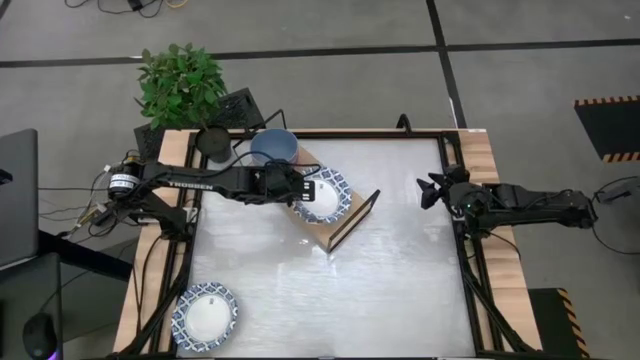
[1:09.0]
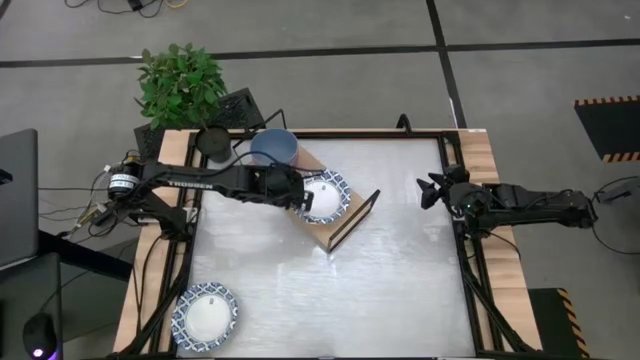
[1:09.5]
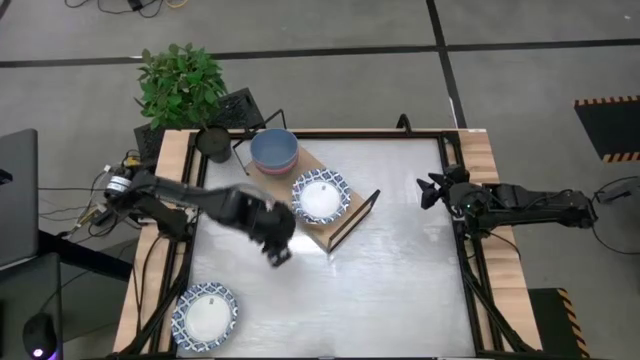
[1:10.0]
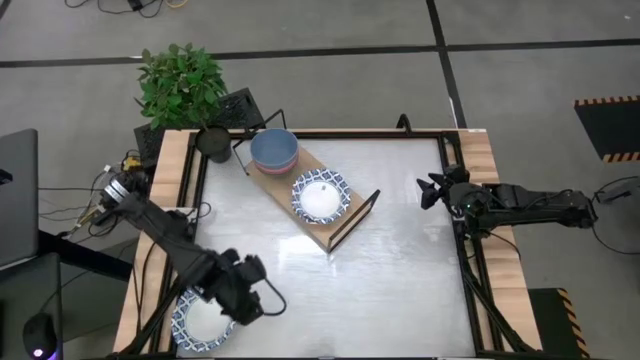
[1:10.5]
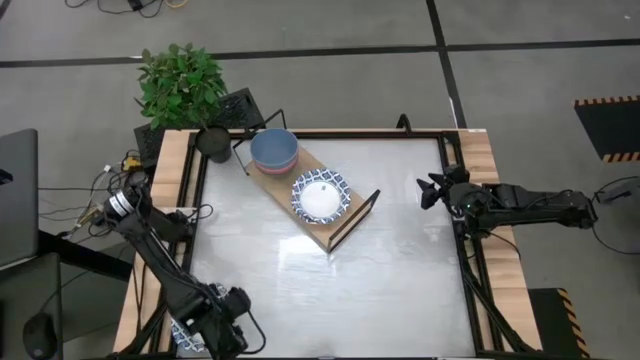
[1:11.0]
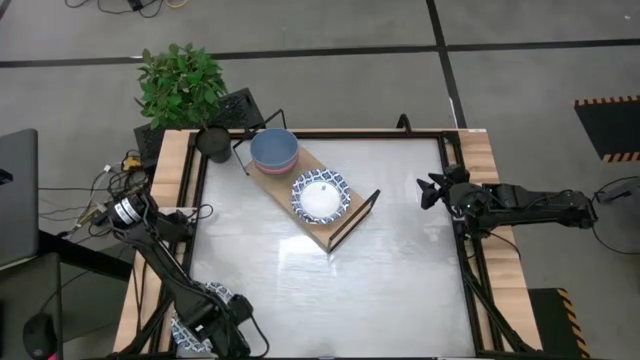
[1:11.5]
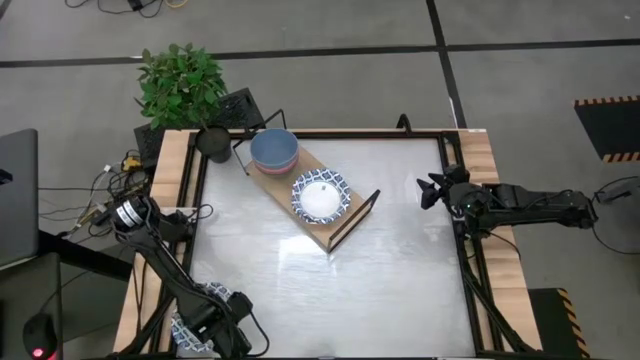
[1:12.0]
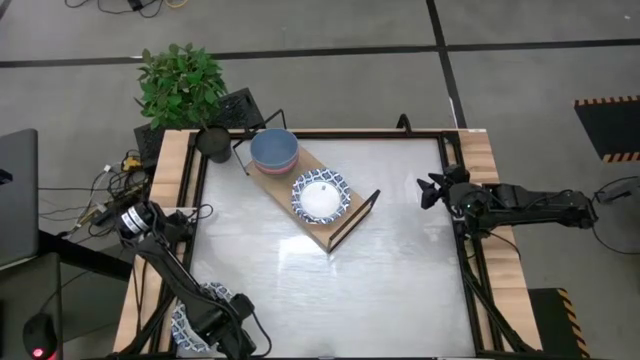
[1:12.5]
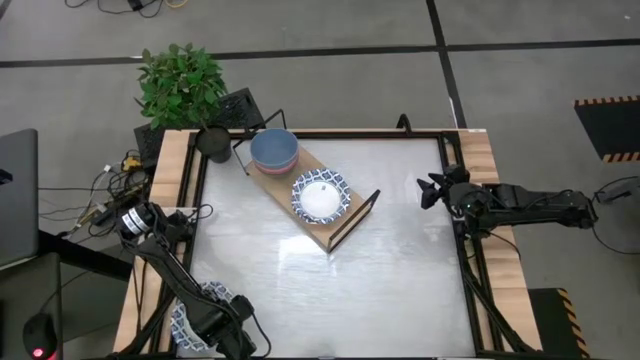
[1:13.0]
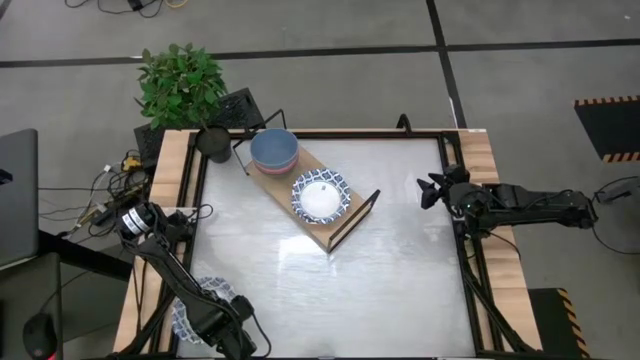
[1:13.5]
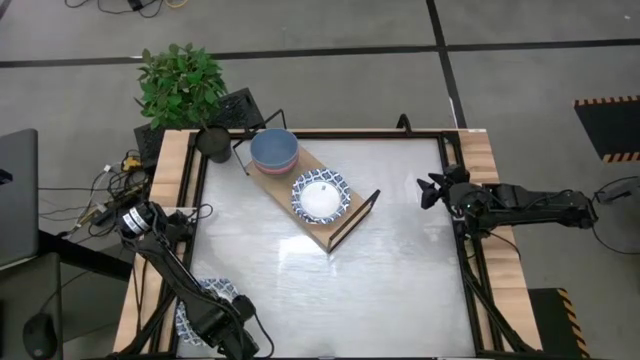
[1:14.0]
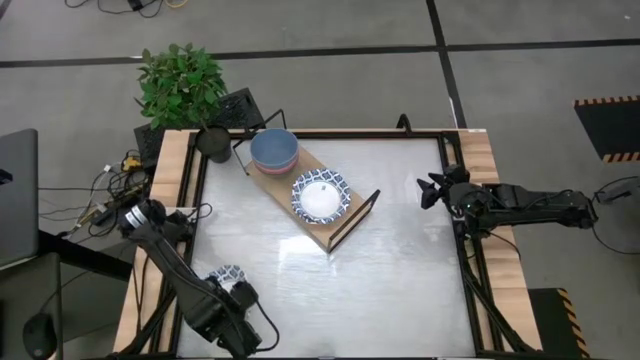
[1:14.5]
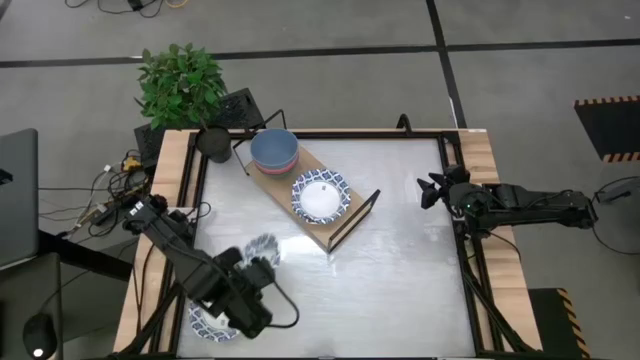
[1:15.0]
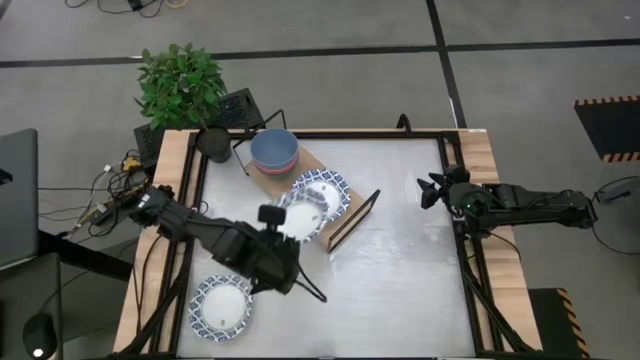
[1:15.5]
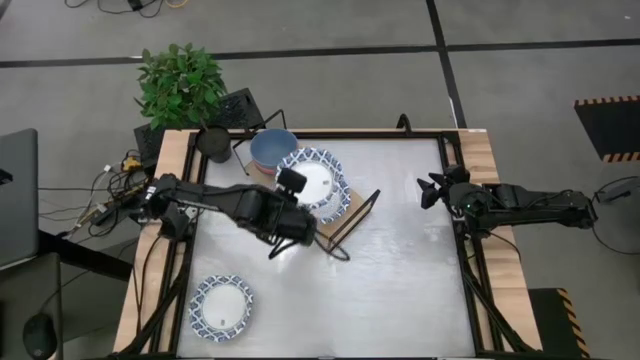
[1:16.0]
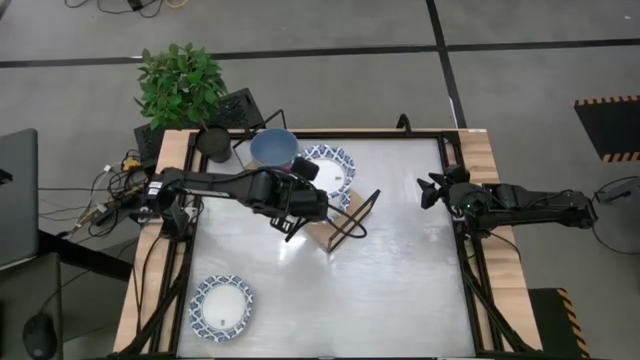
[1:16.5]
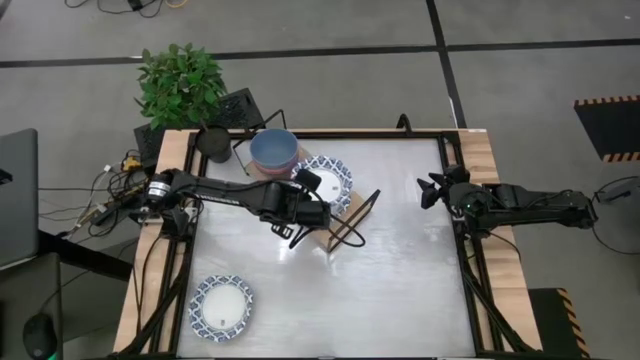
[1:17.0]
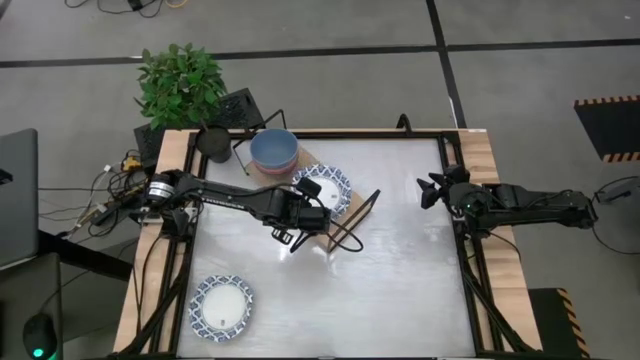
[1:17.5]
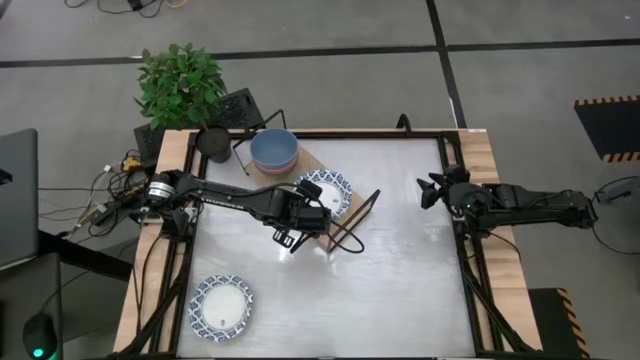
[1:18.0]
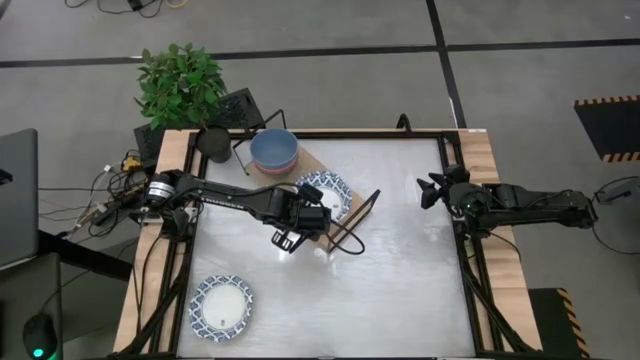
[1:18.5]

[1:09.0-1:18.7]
Task: Place and stack bowls onto a shelf
Stack the top left patterned blue bowl on the patterned blue bowl on the shelf

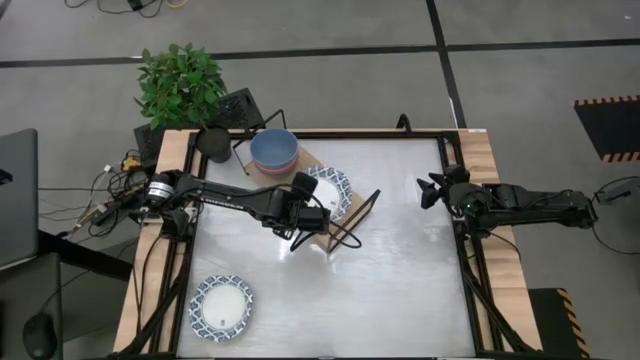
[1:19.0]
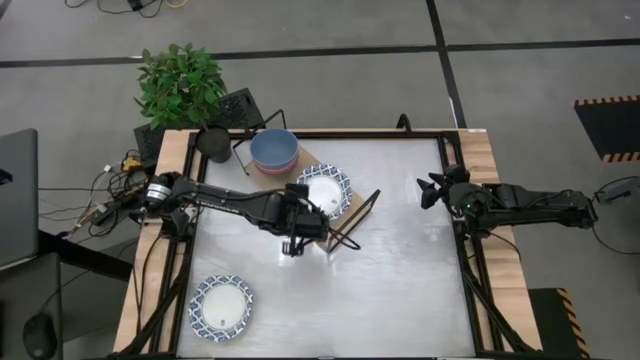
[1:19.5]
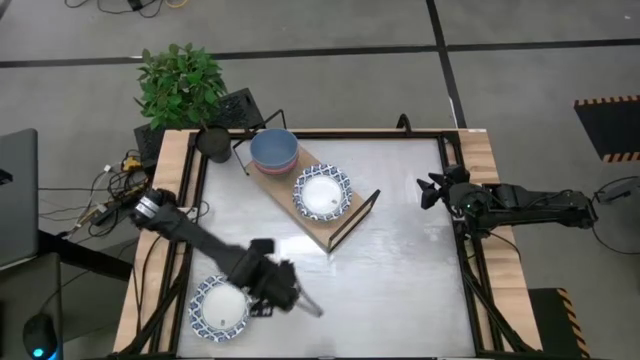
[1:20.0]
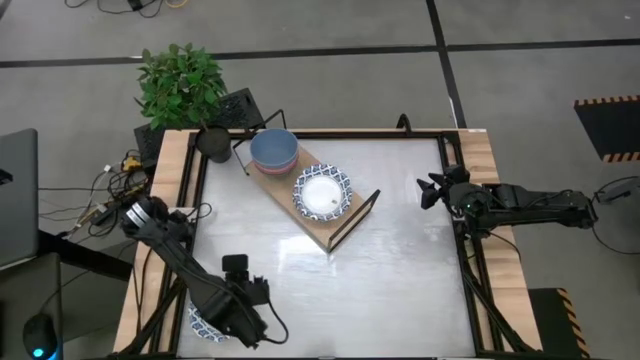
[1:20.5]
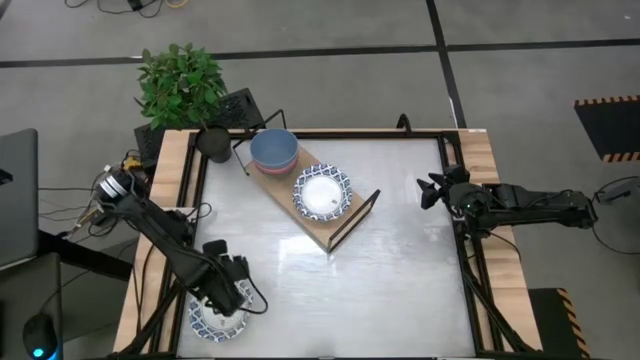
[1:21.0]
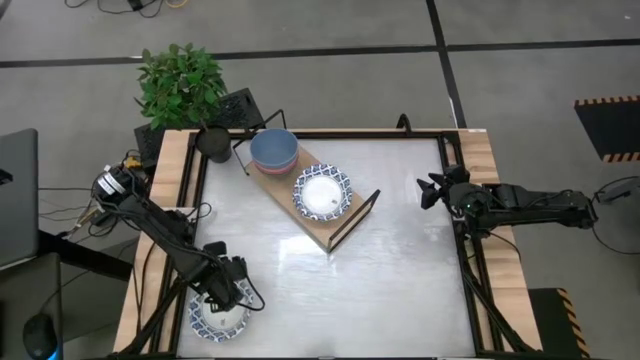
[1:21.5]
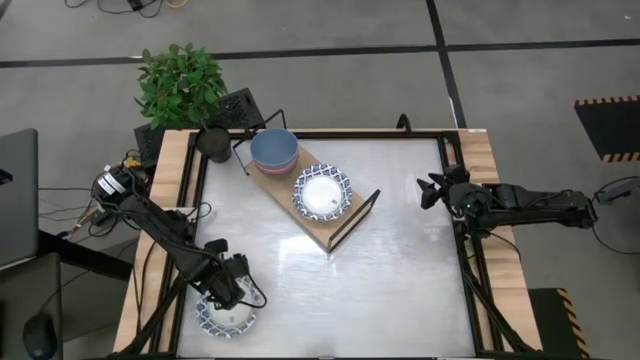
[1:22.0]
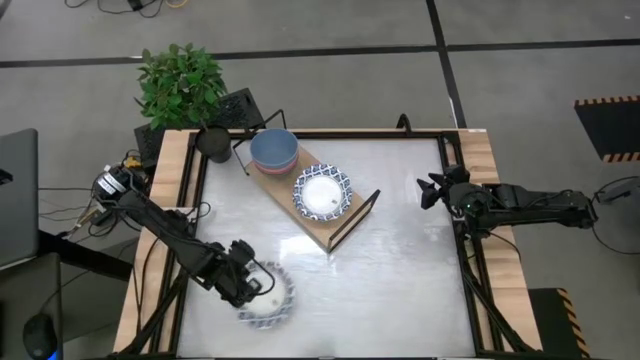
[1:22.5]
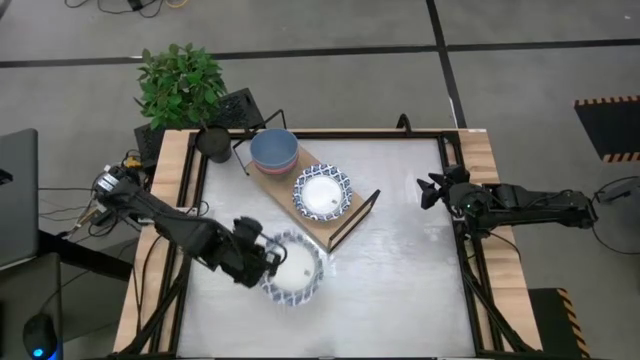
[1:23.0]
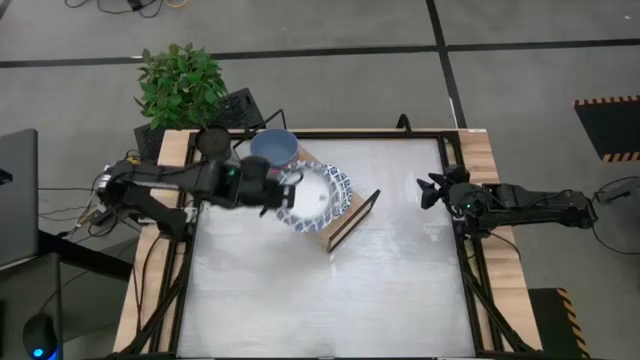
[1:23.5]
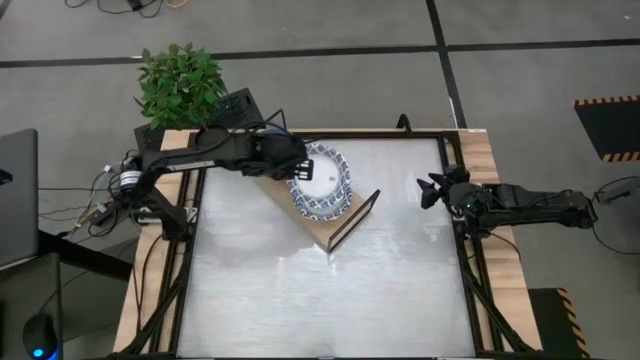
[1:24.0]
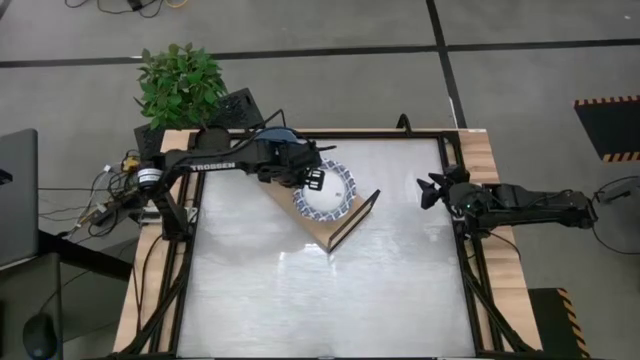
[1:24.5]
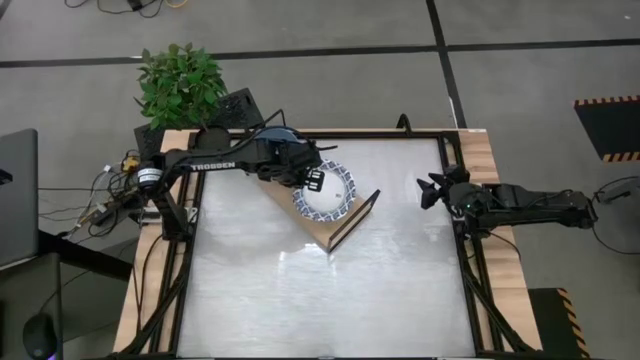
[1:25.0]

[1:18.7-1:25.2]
Stack the bottom left patterned blue bowl on the patterned blue bowl on the shelf

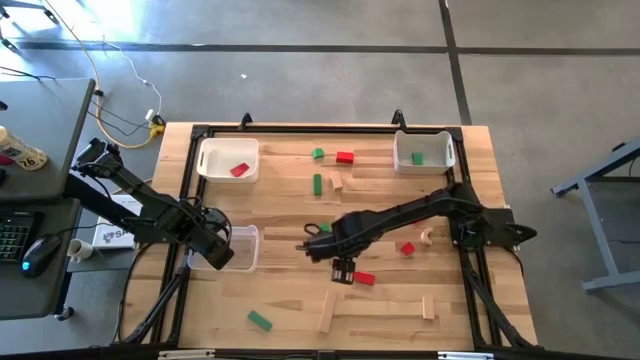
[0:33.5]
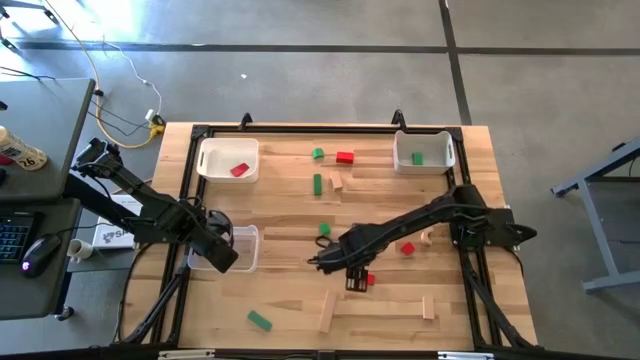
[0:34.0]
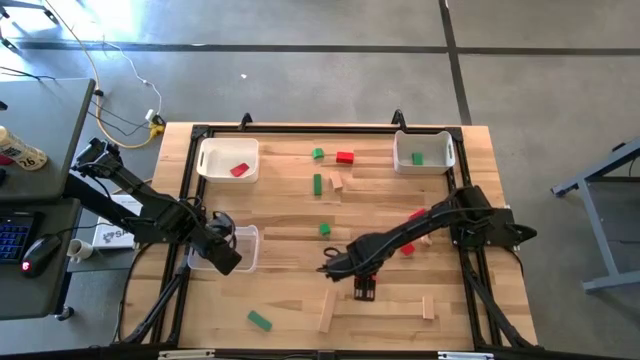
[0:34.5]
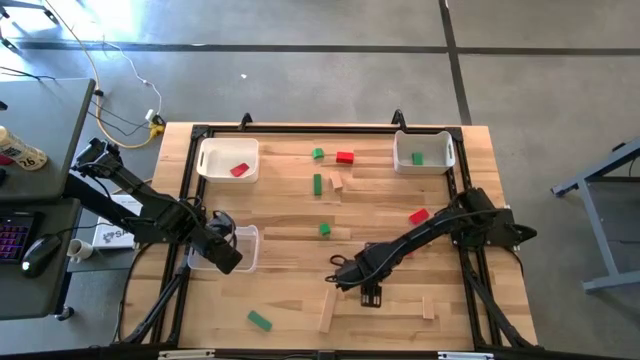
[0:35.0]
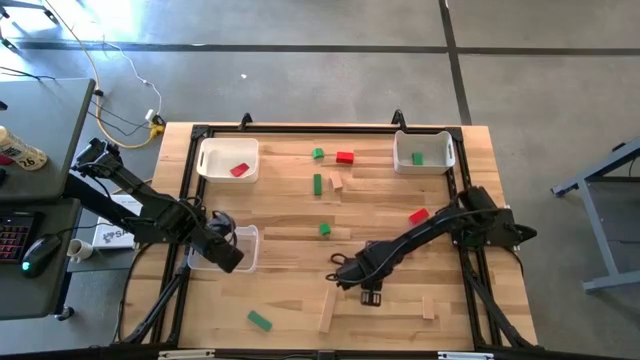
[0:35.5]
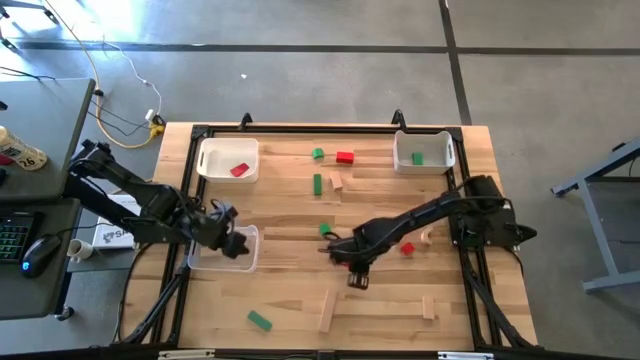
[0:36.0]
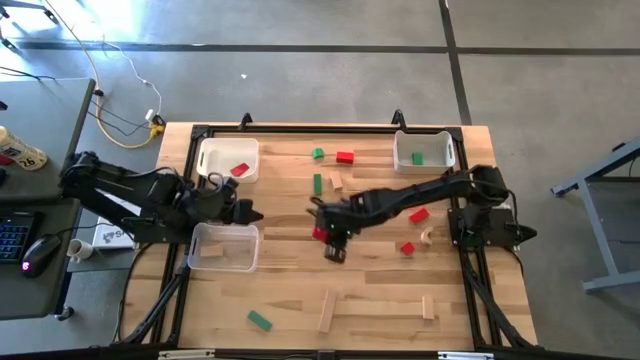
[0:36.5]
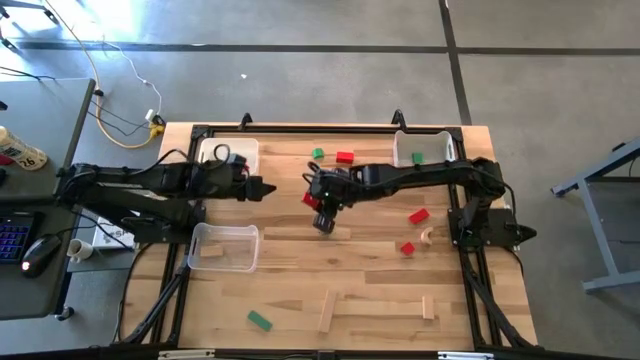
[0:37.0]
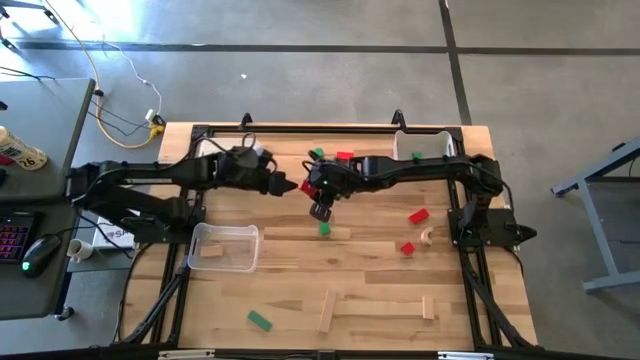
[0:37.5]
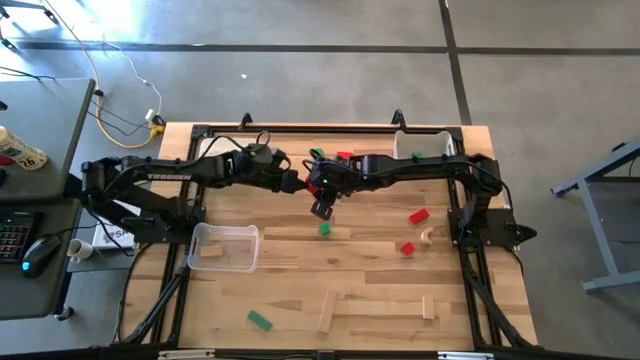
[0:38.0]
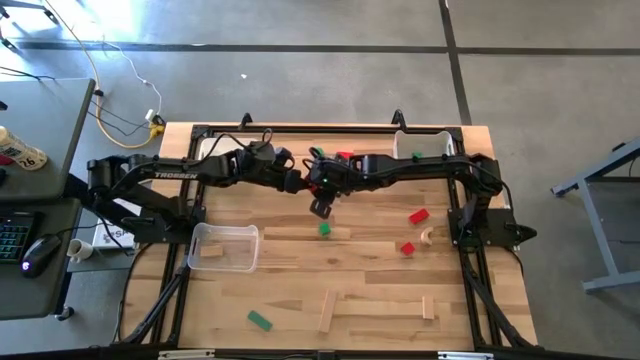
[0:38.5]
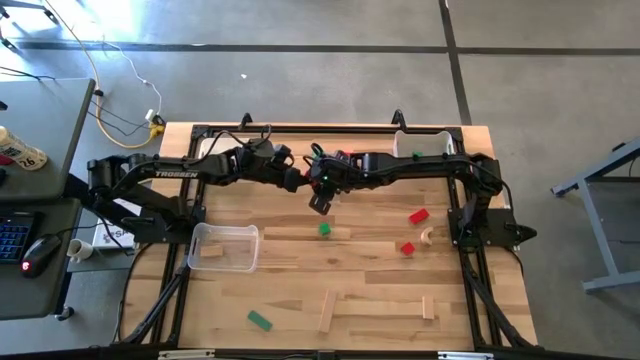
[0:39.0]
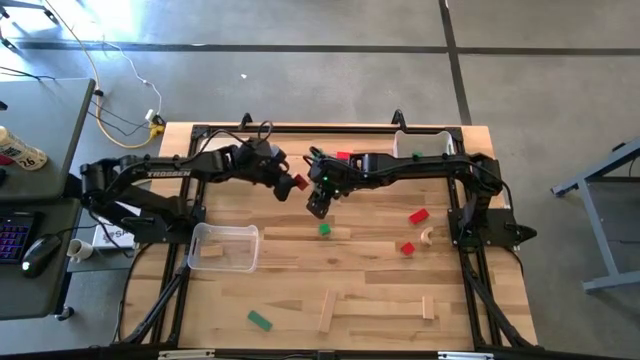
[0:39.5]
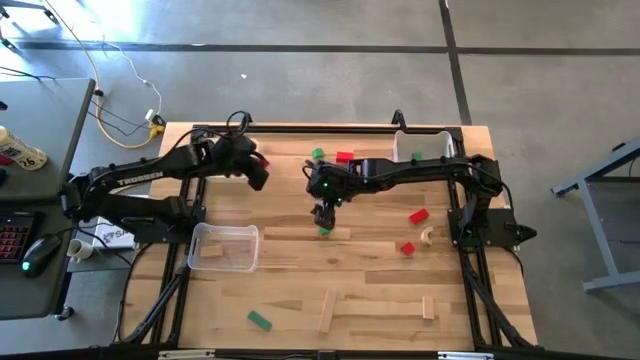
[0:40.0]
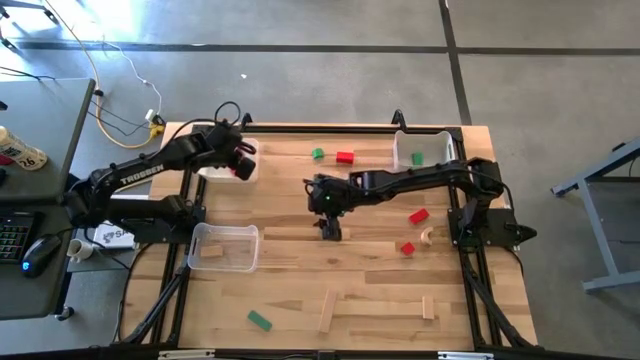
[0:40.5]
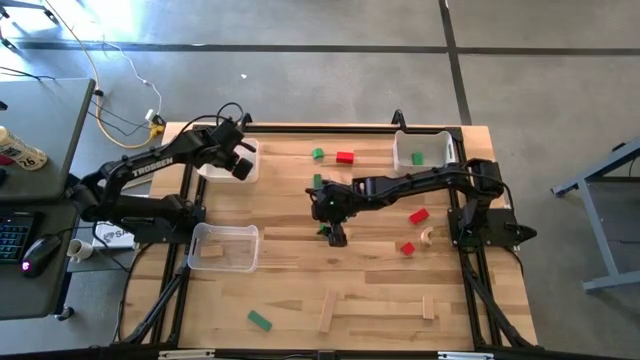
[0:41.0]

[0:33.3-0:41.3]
Task: Sort & place blocks by color
Put the red rectangle into the left white bin
